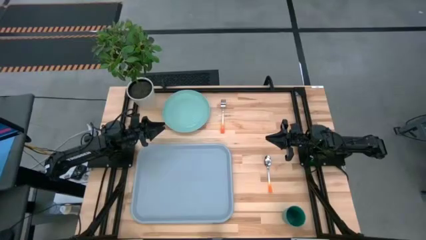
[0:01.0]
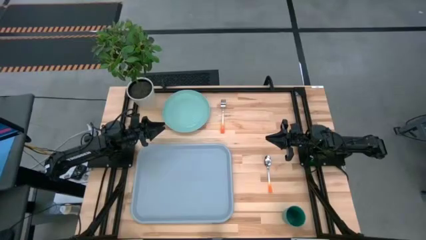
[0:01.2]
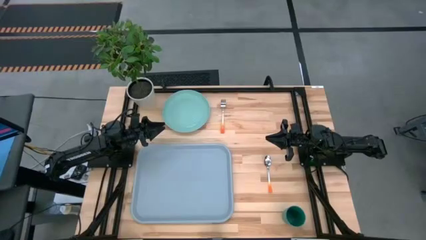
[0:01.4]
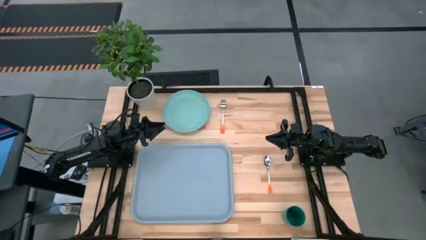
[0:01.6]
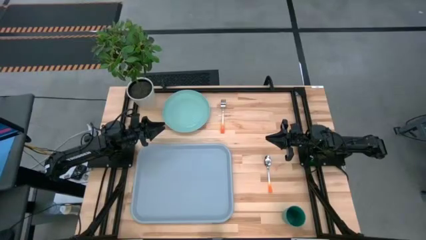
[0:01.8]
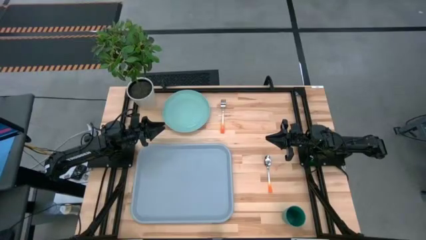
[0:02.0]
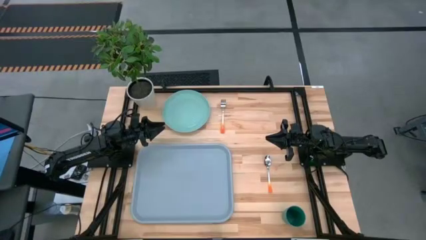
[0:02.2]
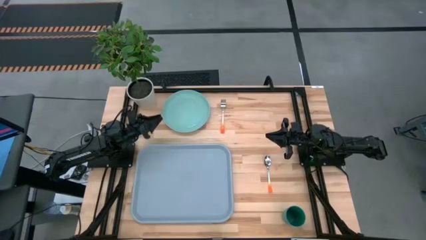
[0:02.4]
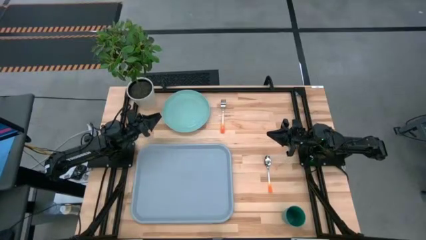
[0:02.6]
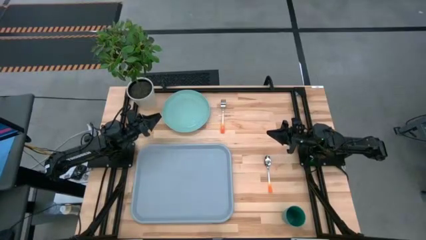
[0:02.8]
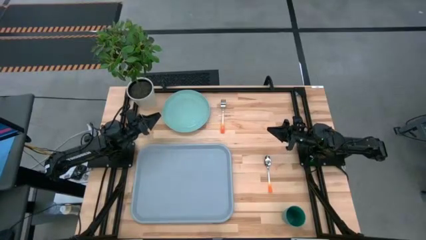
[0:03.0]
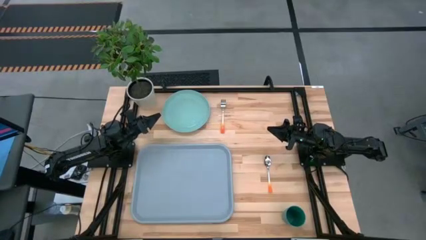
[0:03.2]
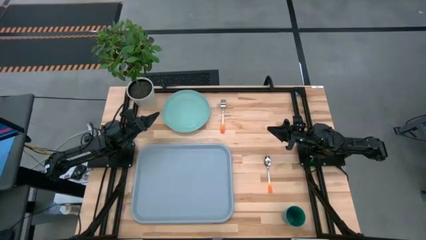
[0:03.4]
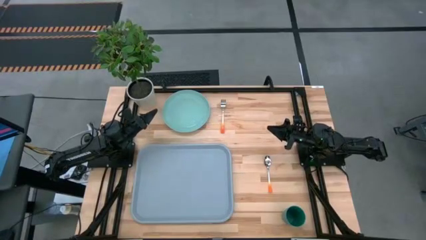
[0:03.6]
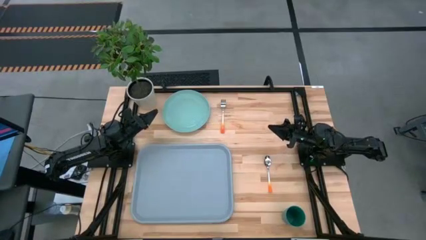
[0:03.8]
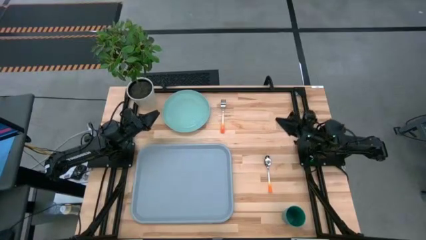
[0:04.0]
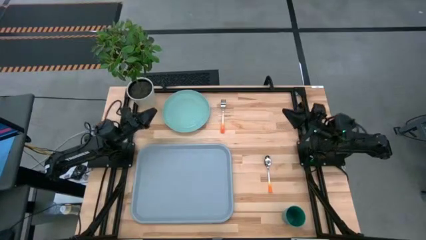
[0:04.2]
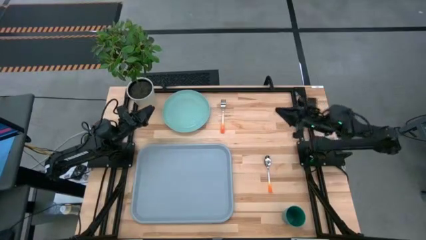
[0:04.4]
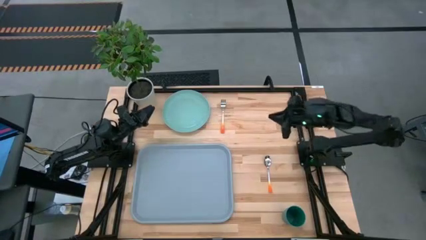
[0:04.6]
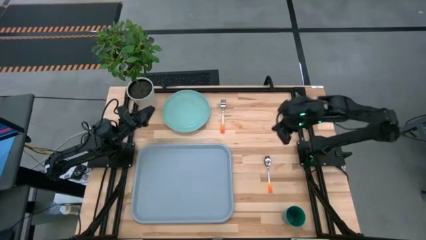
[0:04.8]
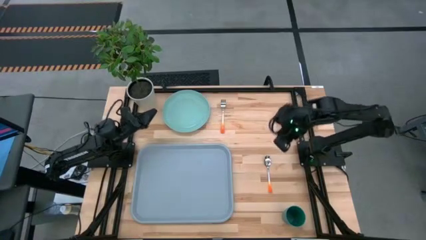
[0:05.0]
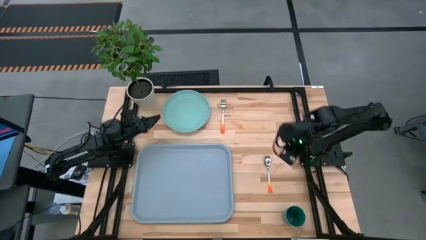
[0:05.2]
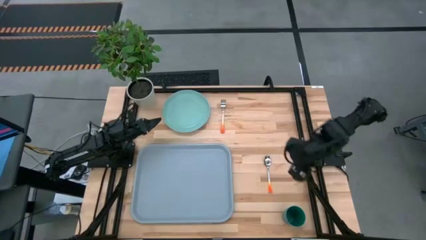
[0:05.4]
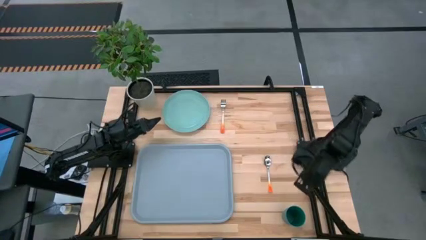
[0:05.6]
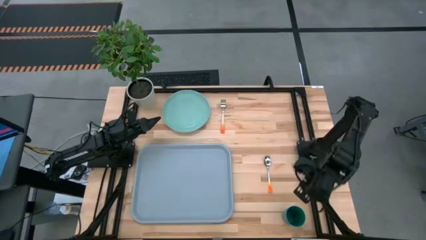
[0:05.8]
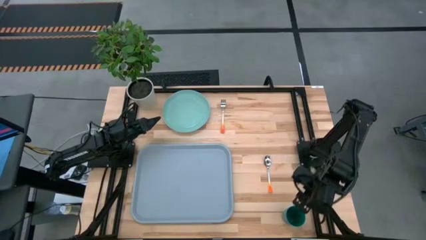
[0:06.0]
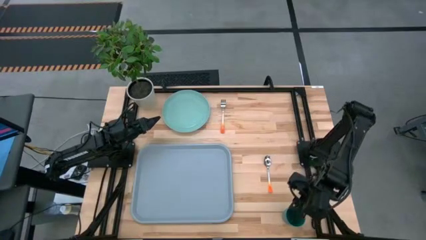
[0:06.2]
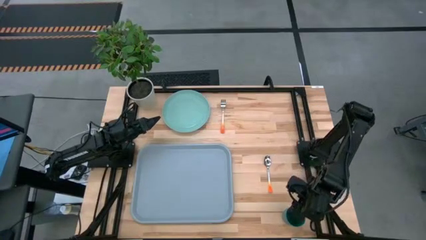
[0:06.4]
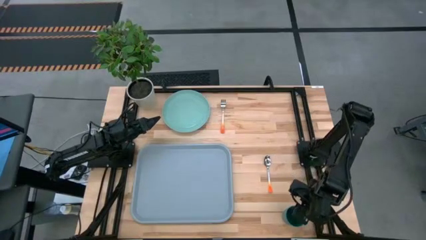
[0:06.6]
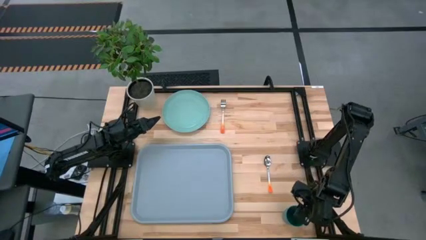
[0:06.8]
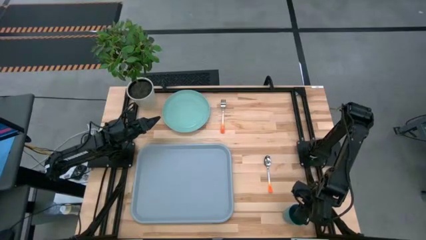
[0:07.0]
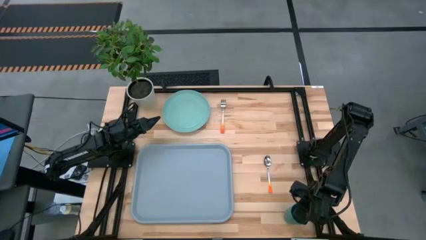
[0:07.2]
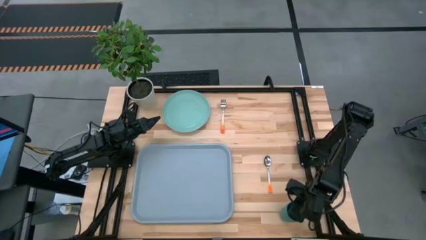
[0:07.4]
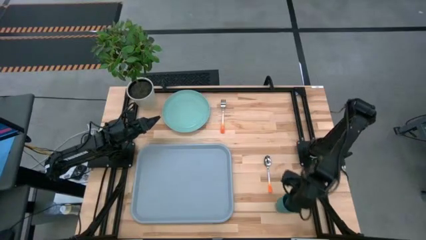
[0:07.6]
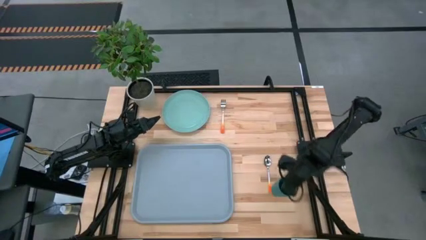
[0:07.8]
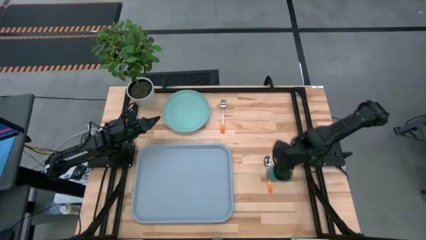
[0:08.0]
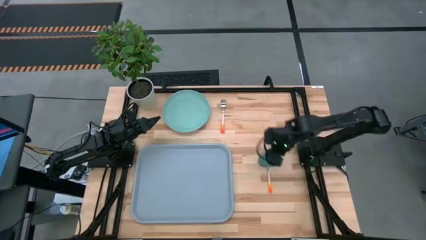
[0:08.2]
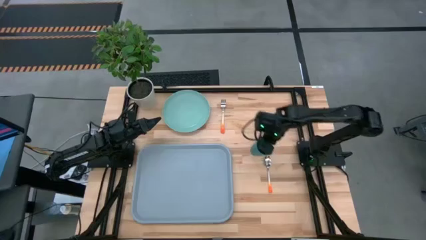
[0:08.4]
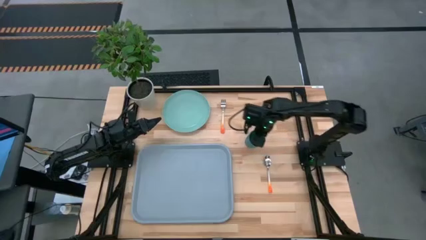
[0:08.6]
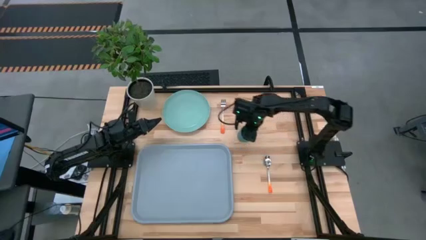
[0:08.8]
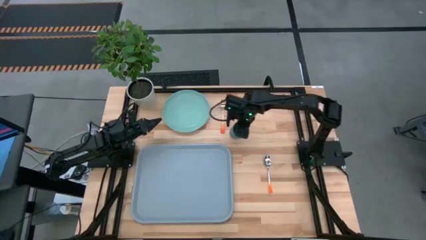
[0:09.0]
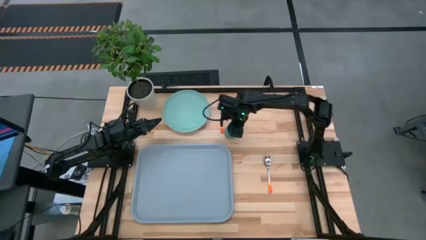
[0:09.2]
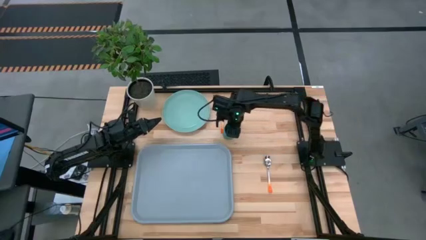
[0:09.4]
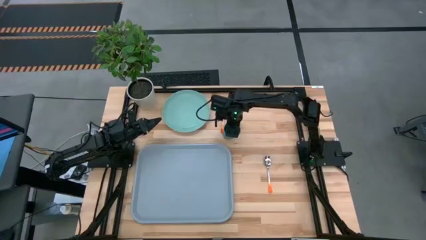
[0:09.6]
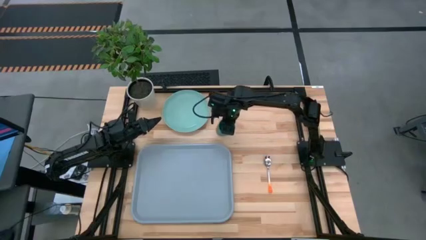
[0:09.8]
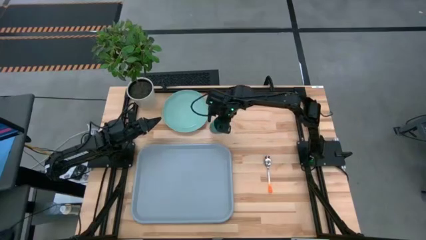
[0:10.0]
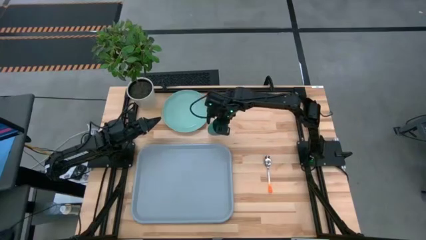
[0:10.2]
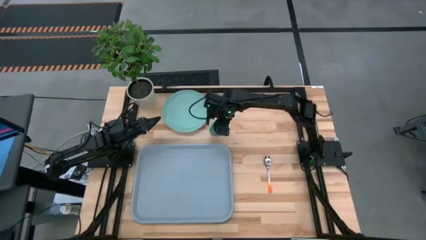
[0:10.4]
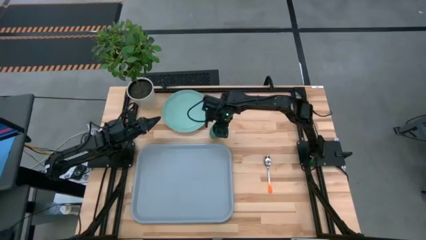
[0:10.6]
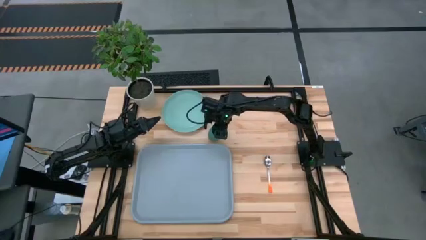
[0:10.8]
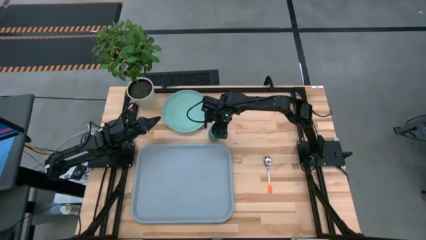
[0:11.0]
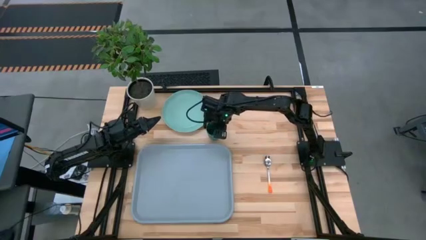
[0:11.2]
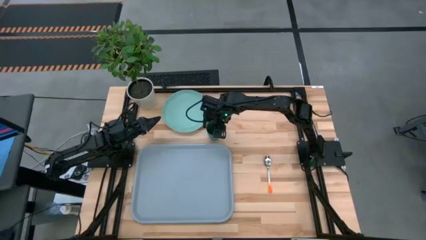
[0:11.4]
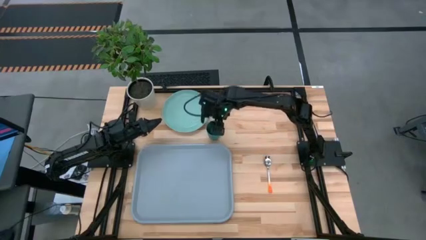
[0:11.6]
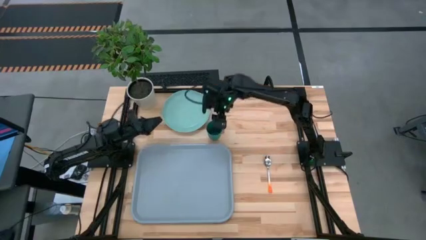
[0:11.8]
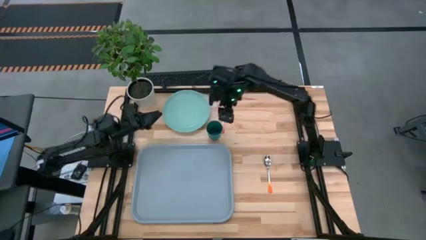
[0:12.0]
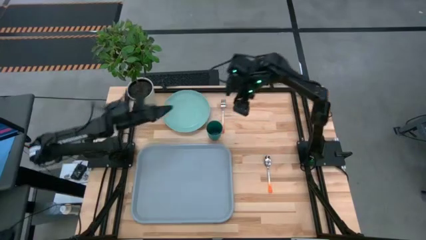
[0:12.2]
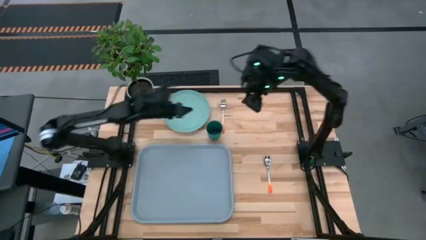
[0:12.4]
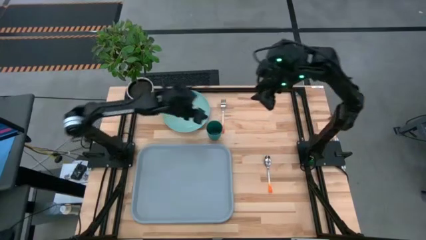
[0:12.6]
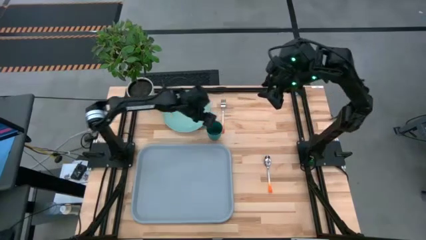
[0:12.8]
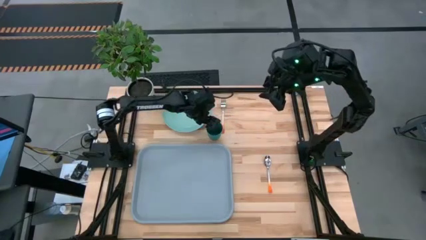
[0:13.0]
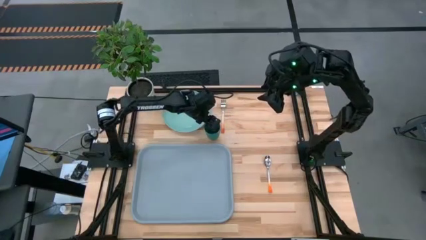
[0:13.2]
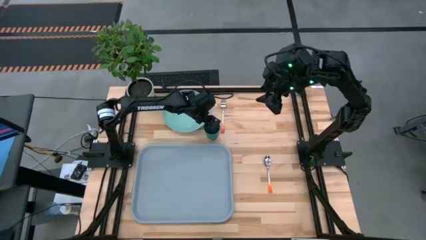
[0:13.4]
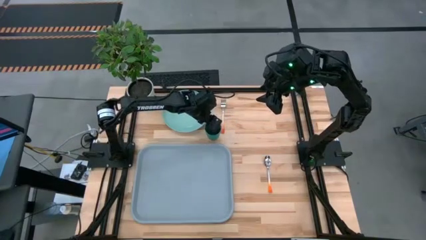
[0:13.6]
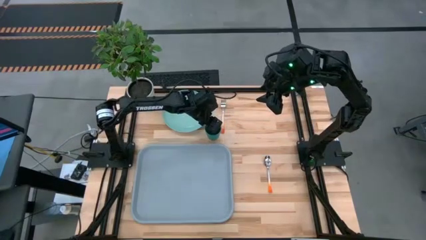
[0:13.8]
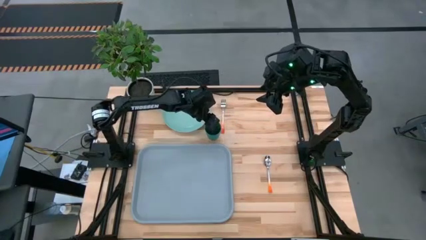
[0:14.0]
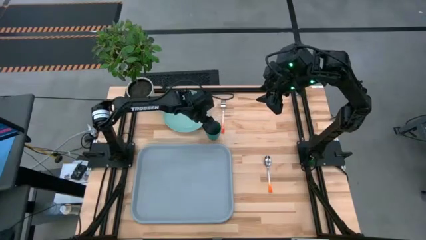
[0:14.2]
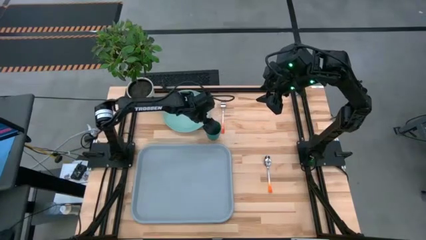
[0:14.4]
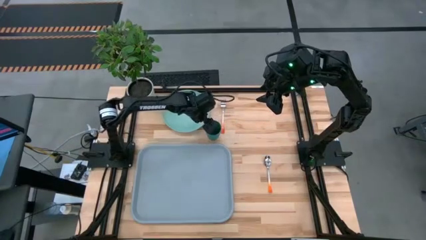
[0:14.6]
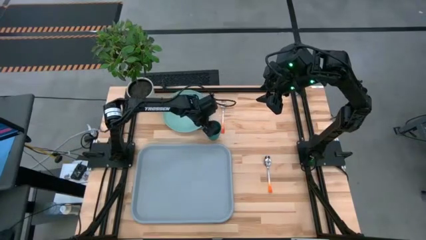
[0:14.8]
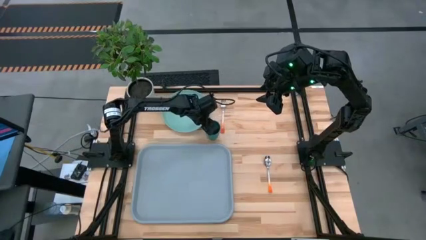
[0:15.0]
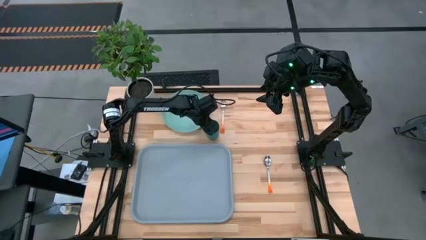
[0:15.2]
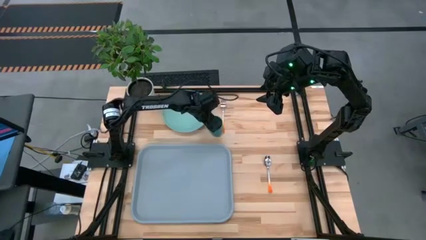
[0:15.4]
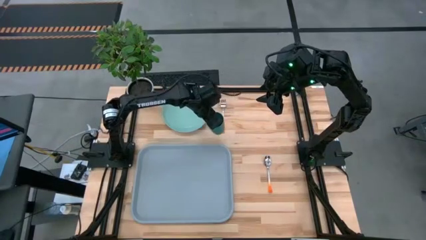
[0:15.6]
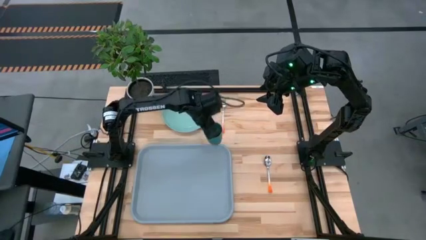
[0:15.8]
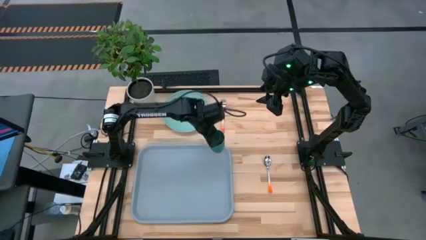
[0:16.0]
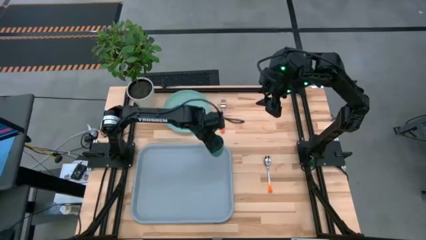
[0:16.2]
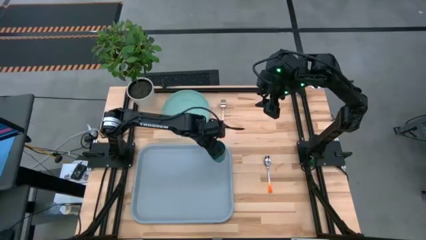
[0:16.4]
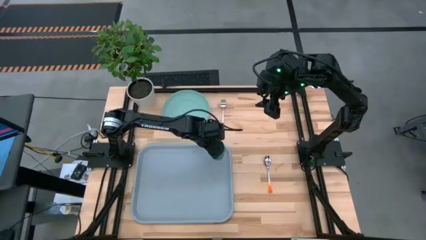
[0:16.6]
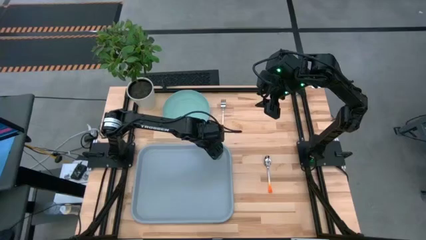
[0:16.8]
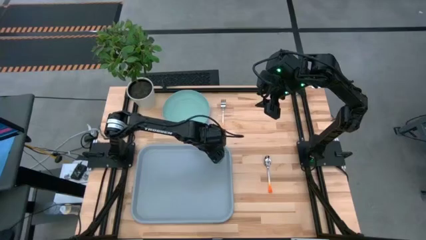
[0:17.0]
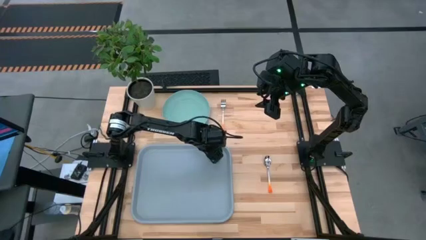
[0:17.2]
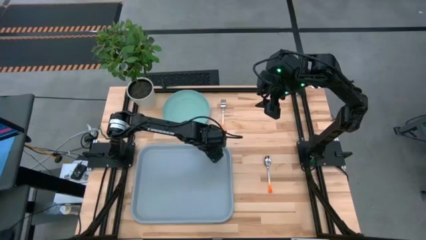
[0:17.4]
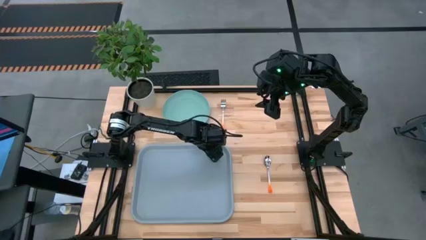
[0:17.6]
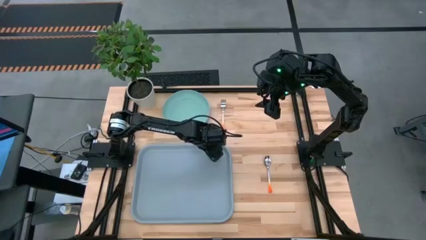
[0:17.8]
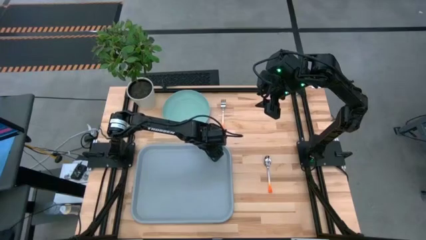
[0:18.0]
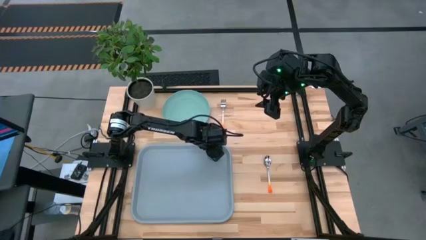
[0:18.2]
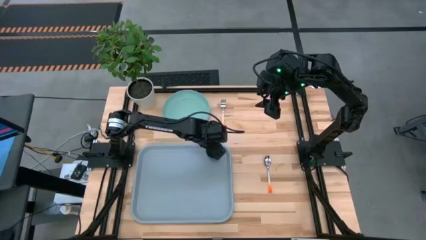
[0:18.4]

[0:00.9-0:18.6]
Task: Pick and place plate/cup/fork/spoon on tray
Put the green cup to the top right side of the blue serving tray
